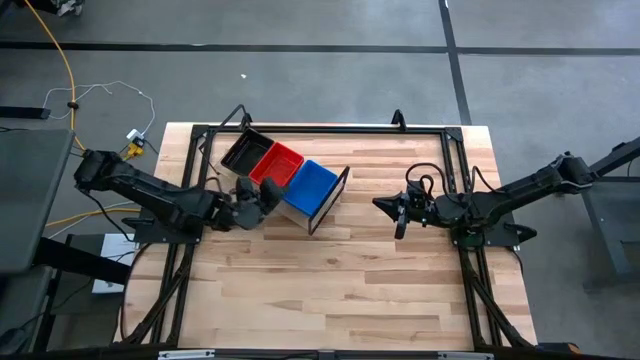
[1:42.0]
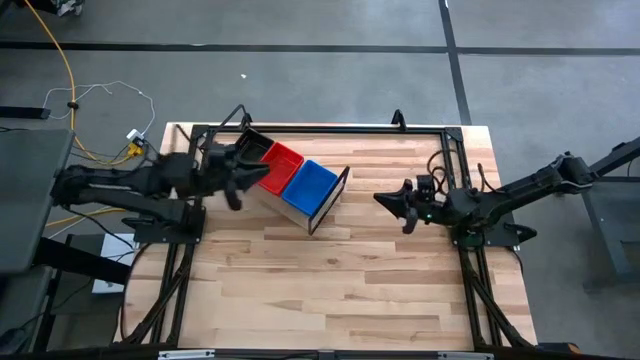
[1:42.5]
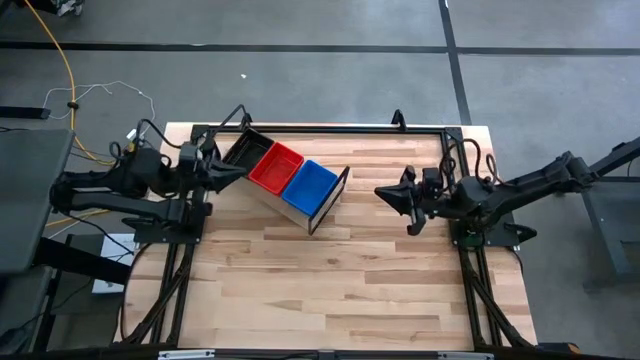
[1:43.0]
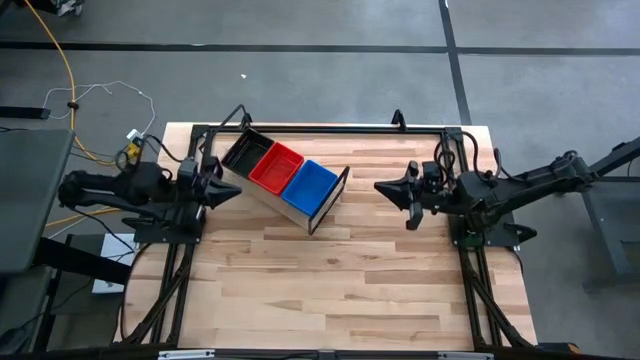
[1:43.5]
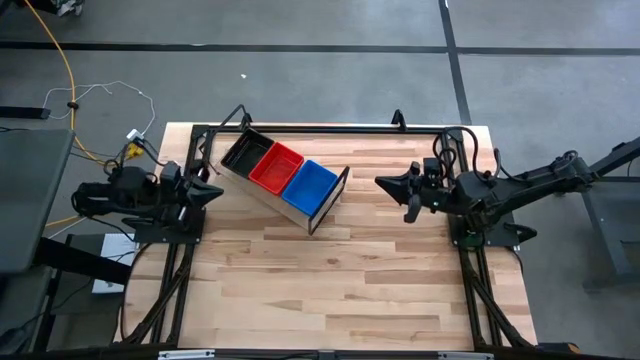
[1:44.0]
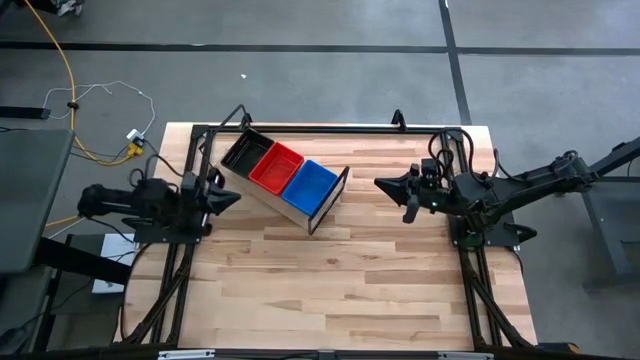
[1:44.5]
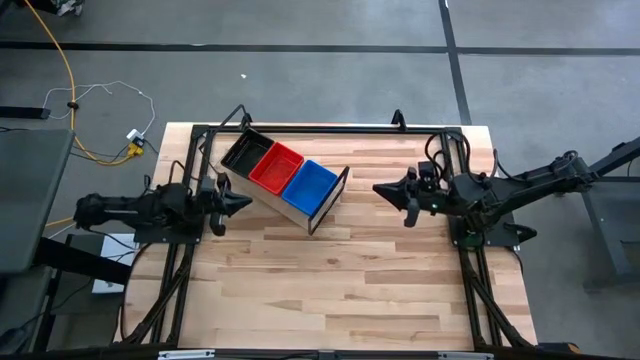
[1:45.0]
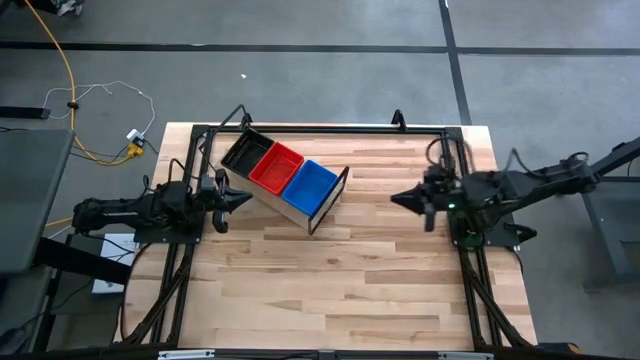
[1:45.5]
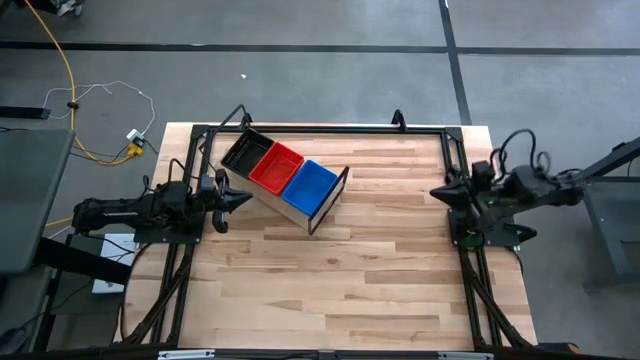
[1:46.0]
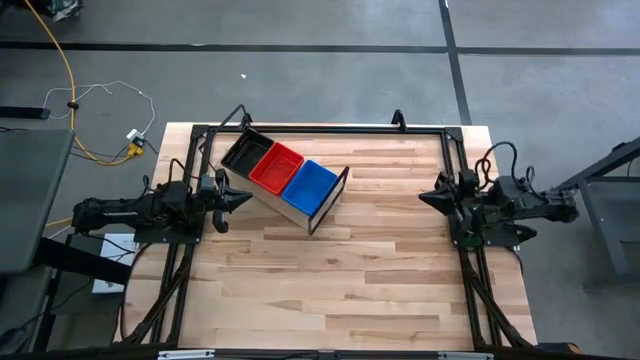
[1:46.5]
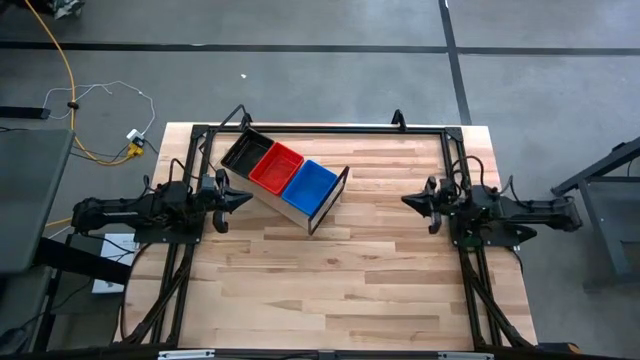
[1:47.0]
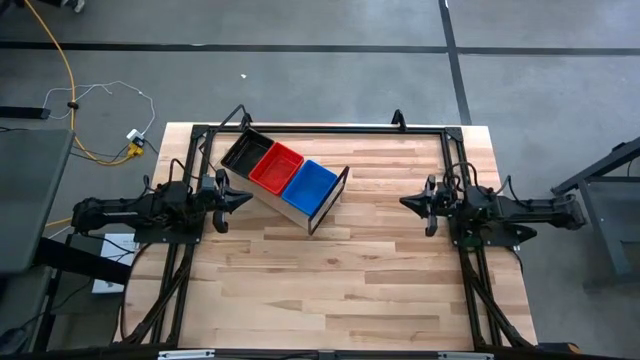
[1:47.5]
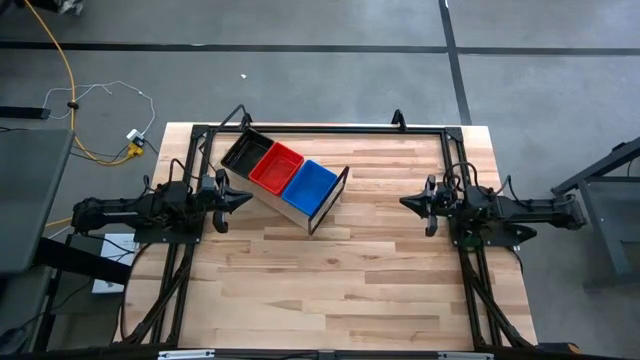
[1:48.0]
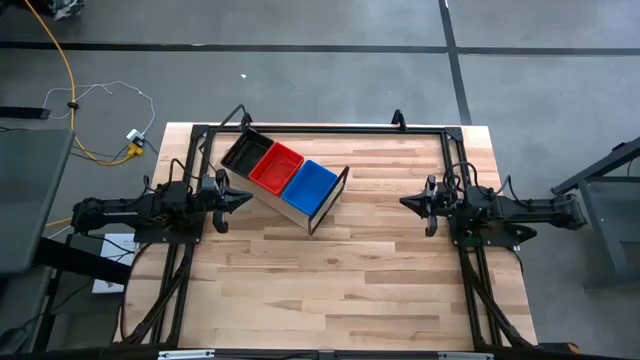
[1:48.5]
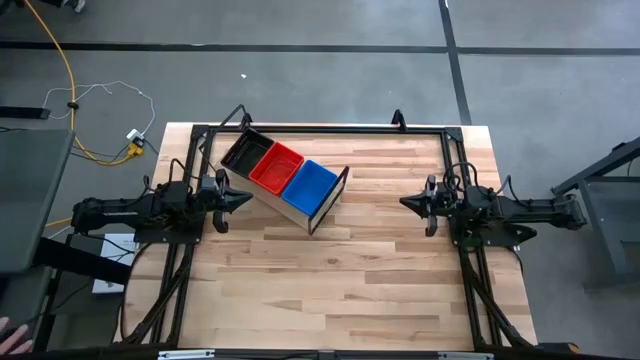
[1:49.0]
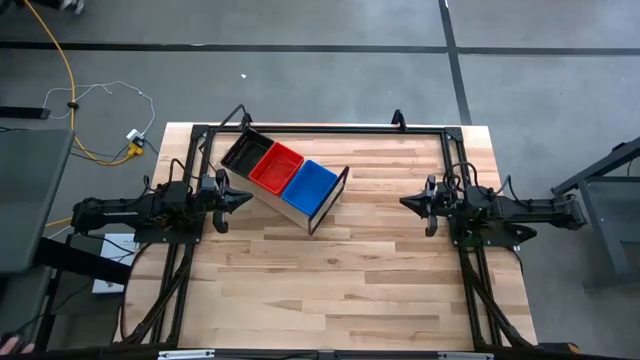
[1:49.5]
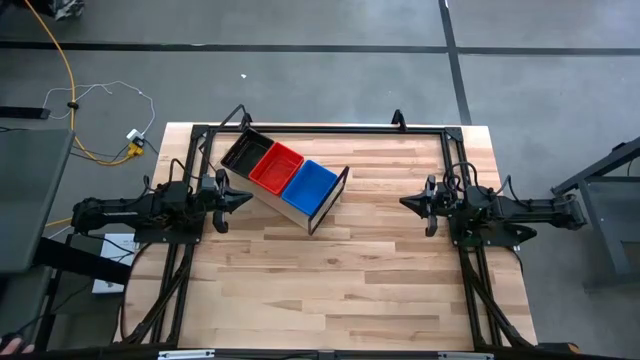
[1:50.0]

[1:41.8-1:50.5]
Task: Stack baskets on shelf by color
Return to Home Position

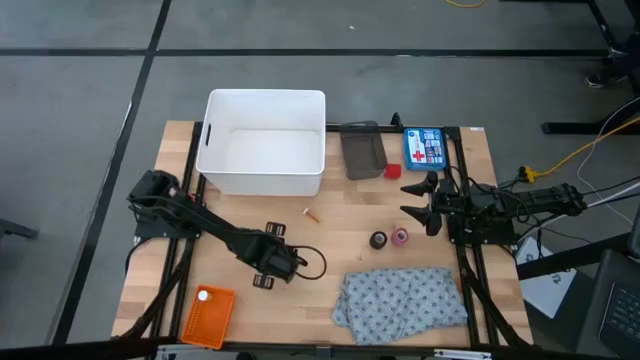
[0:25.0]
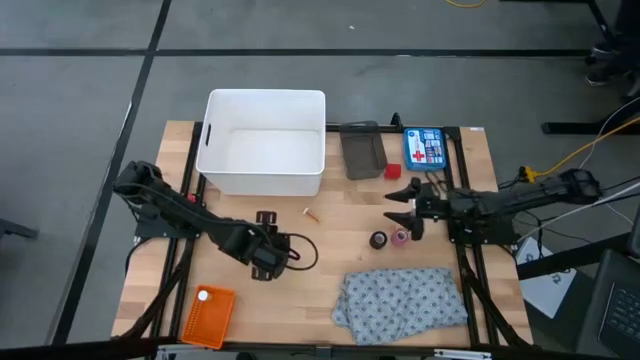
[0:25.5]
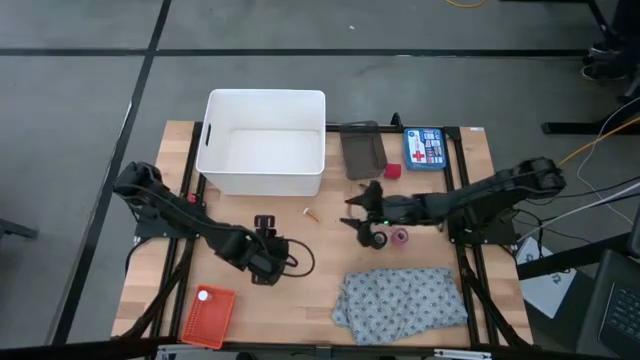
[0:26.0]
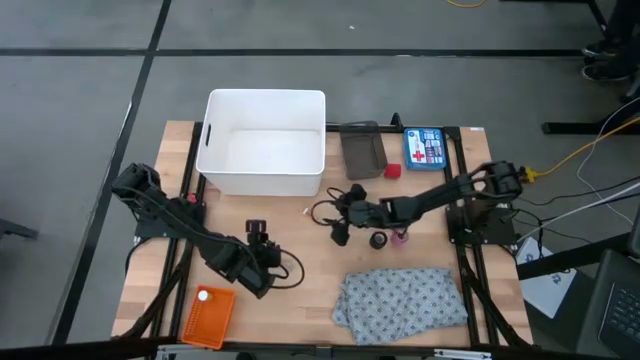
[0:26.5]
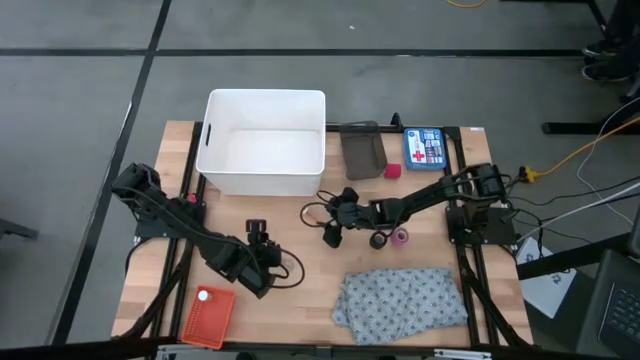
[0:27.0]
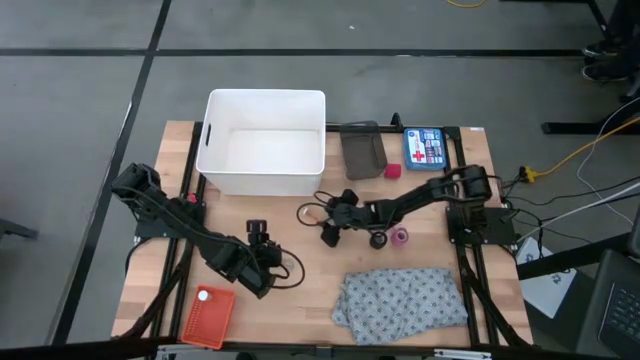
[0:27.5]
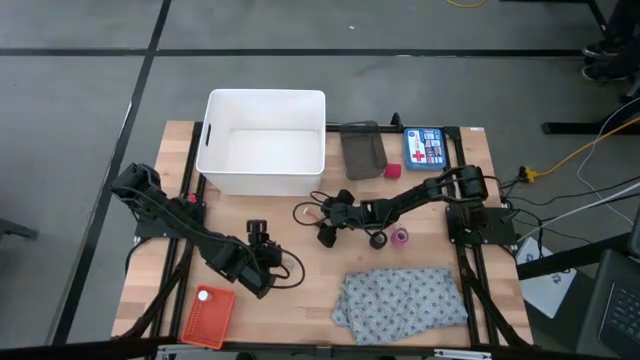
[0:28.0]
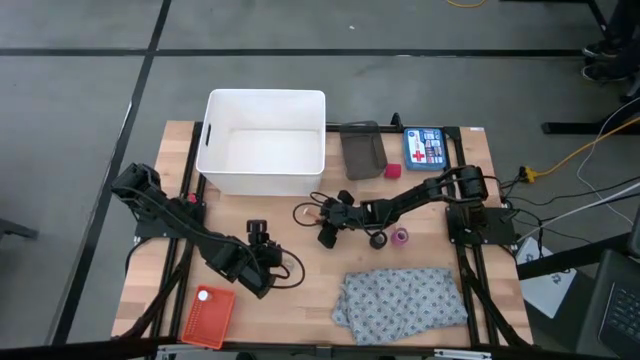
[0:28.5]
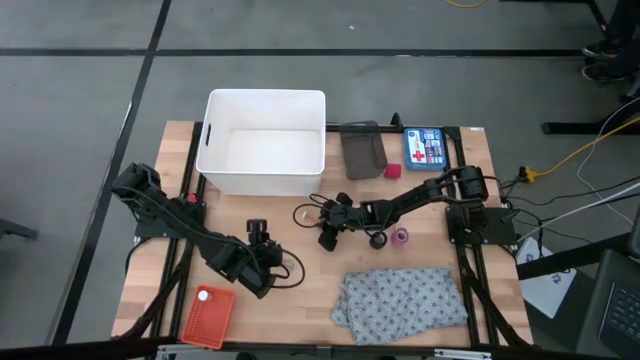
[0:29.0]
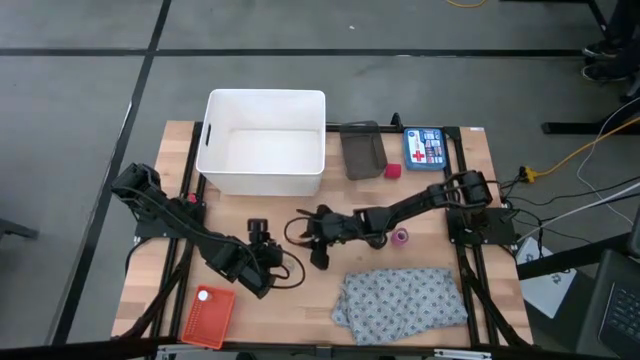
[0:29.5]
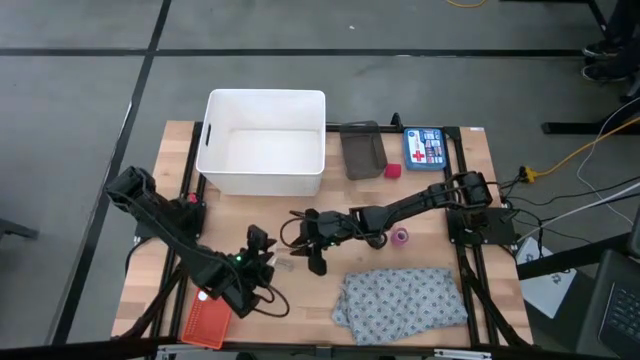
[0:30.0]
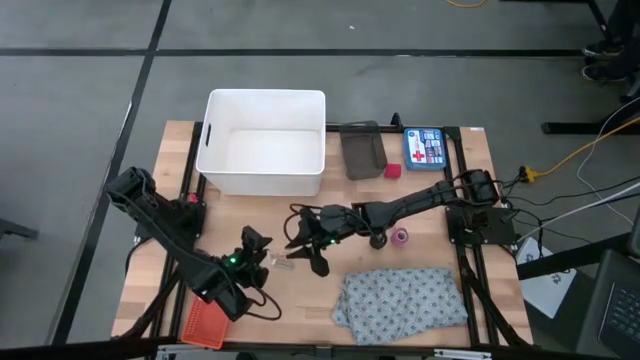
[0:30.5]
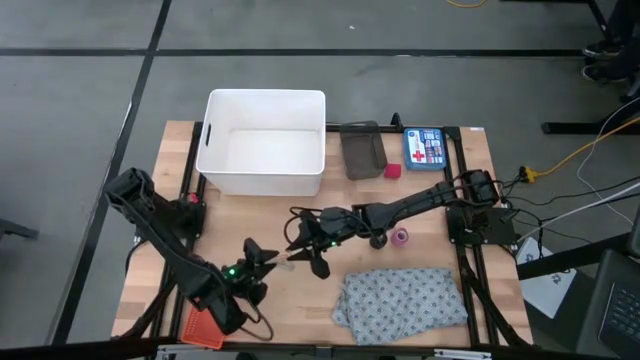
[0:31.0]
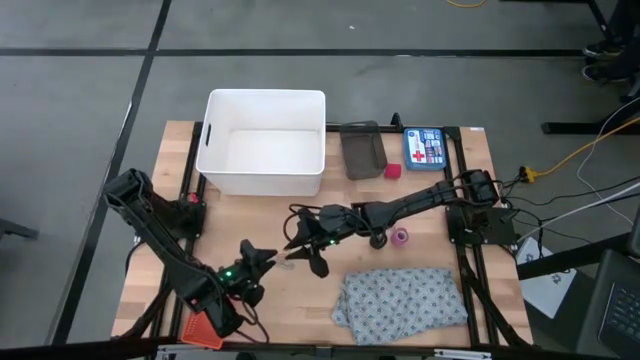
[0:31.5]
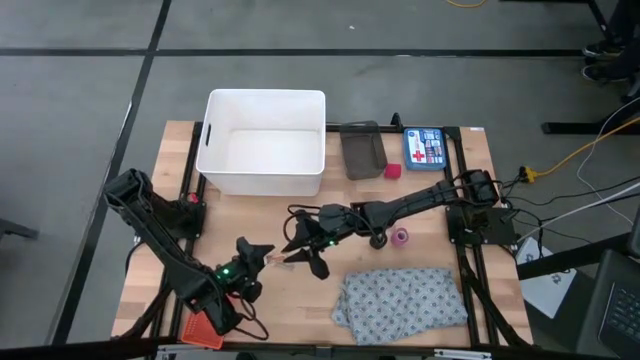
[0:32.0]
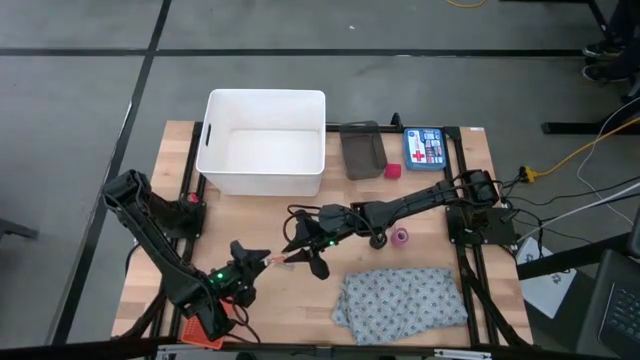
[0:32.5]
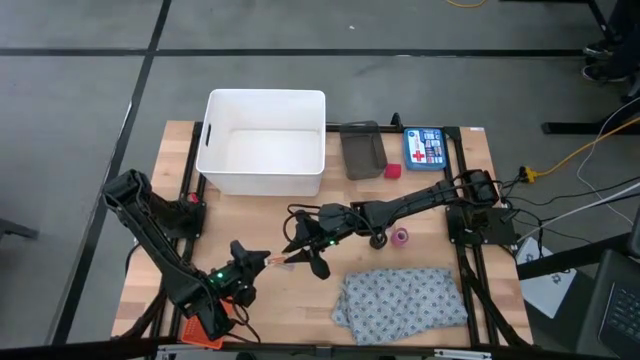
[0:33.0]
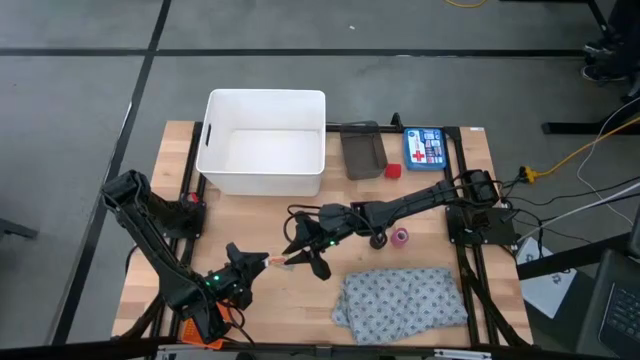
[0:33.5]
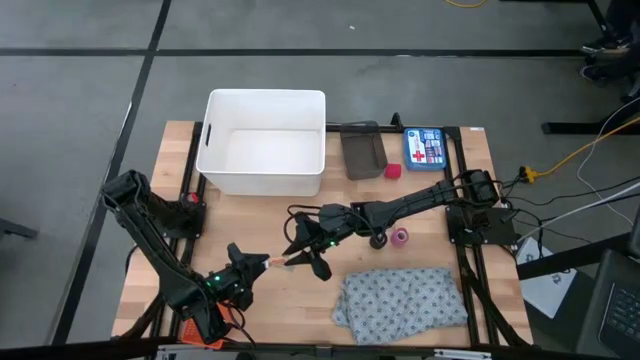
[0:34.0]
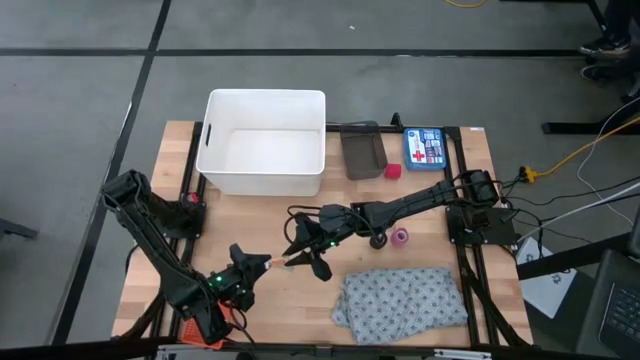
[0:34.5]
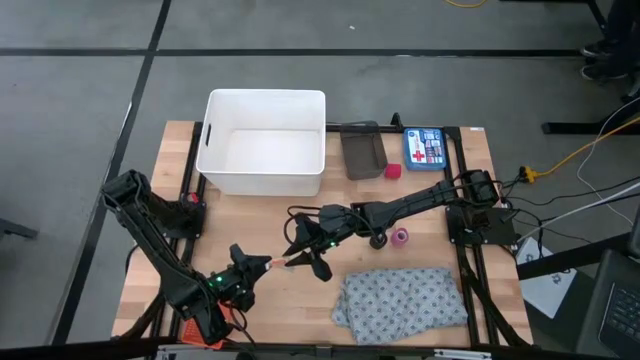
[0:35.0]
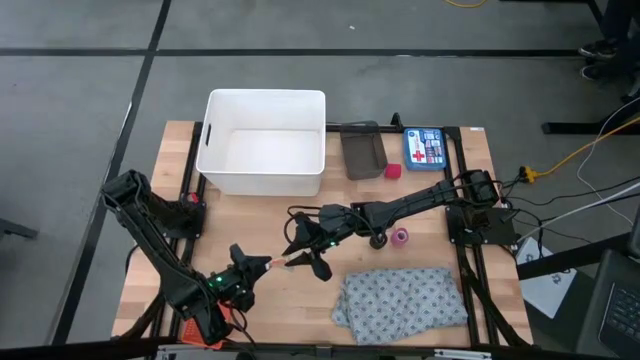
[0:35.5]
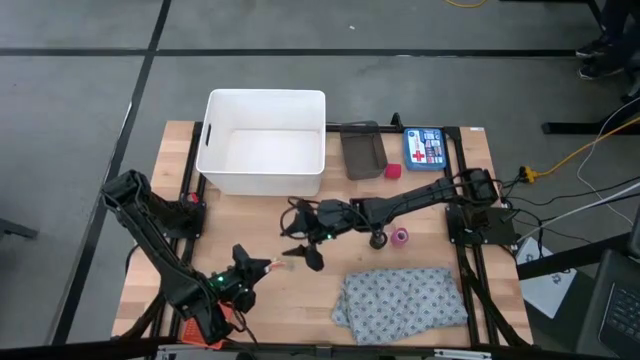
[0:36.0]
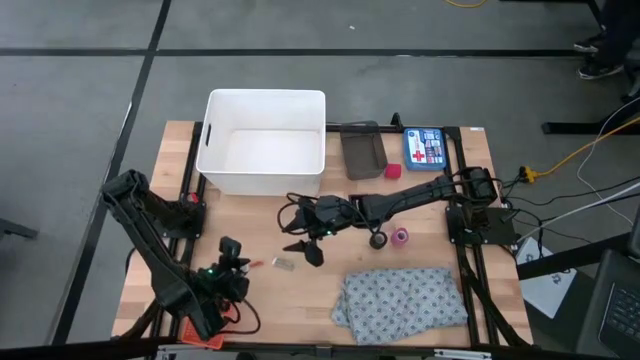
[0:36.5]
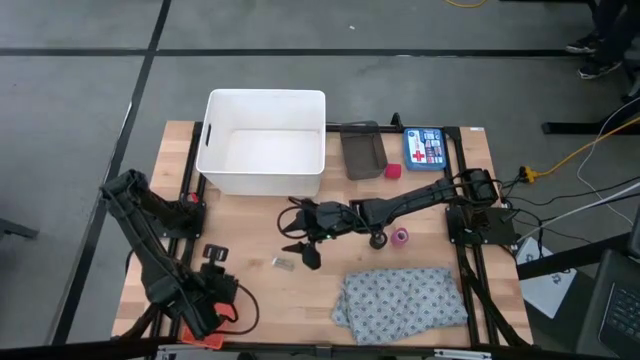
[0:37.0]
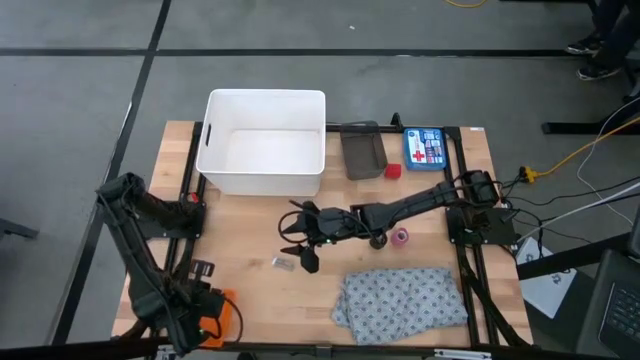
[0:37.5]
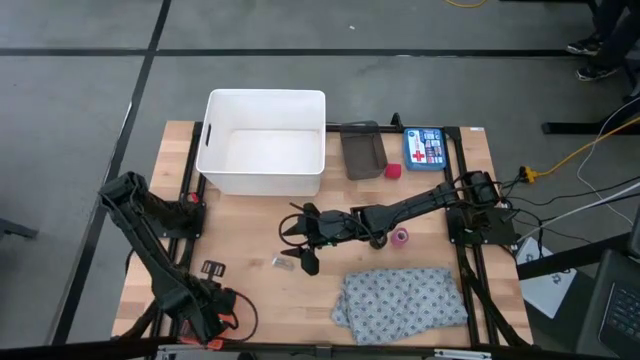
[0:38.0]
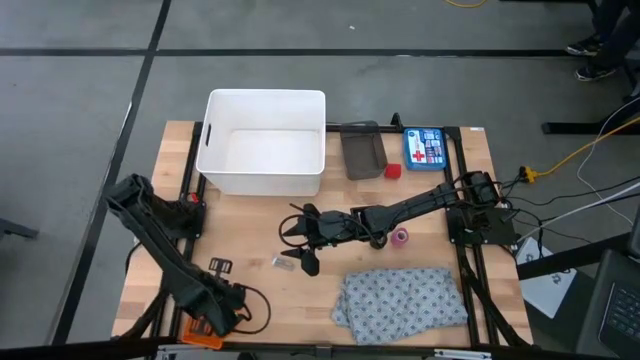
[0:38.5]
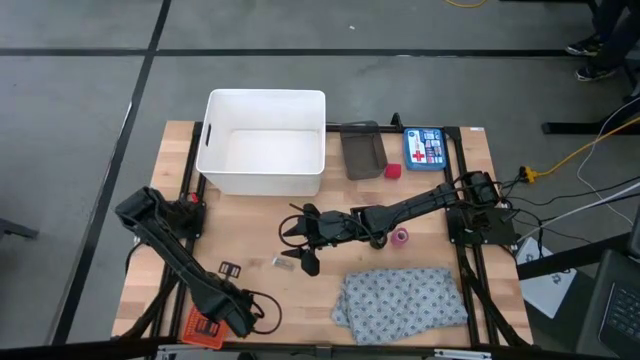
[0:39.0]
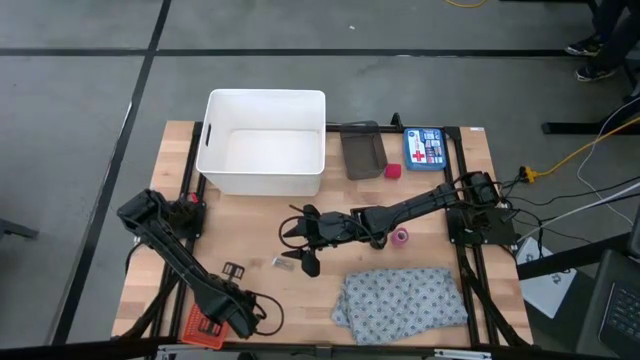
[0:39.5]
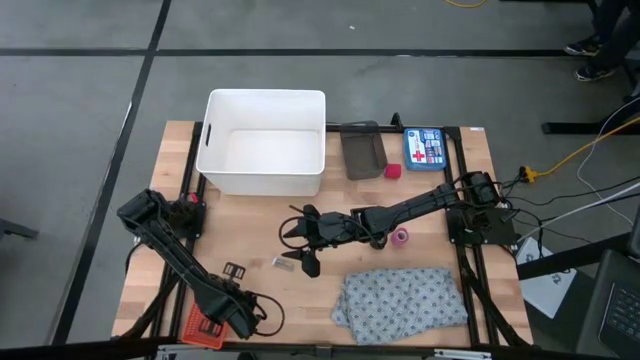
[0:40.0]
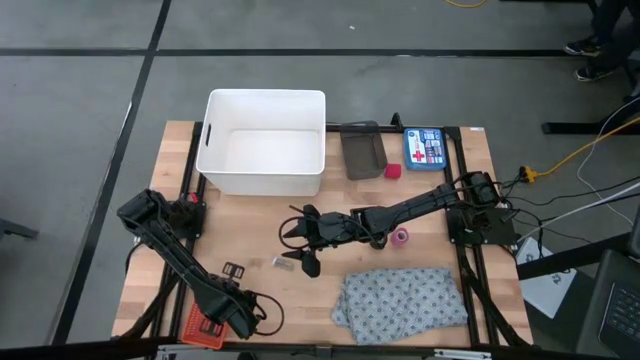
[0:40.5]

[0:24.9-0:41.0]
Task: Pick & place medical supplies in basket/bin
Put the yellow pill bottle into the orange bin
